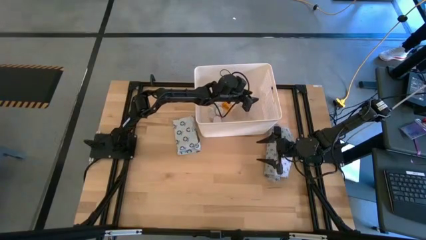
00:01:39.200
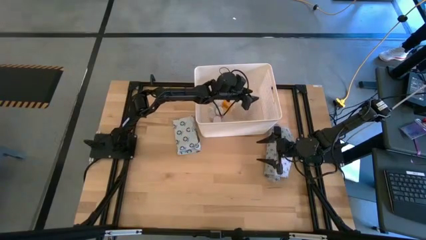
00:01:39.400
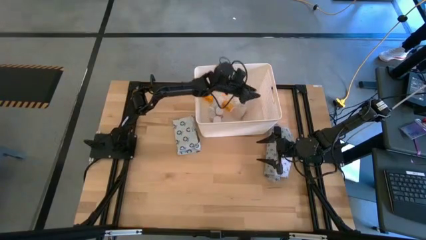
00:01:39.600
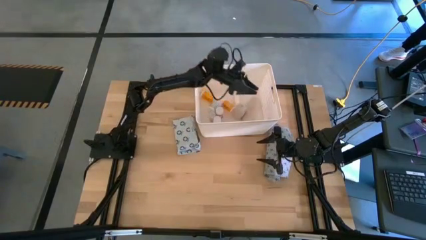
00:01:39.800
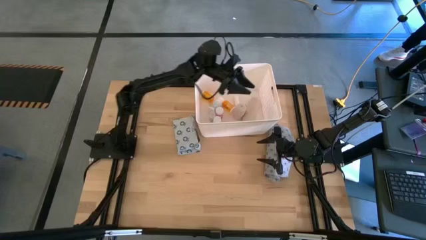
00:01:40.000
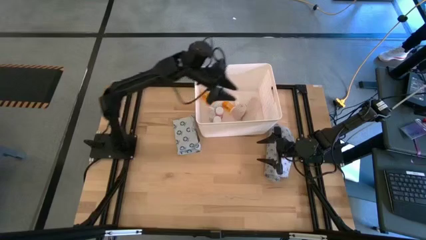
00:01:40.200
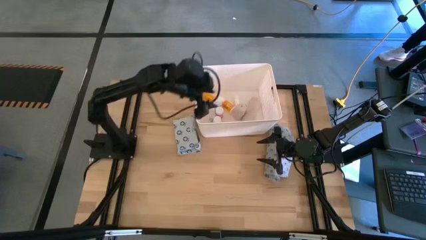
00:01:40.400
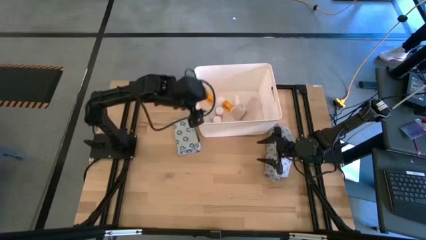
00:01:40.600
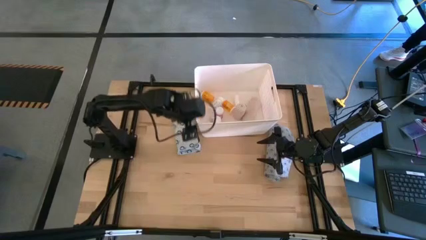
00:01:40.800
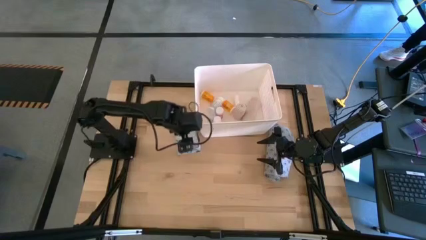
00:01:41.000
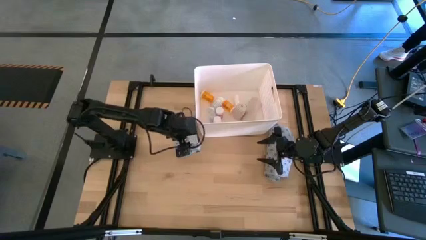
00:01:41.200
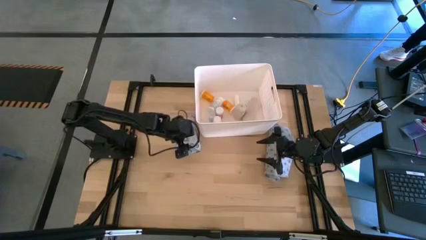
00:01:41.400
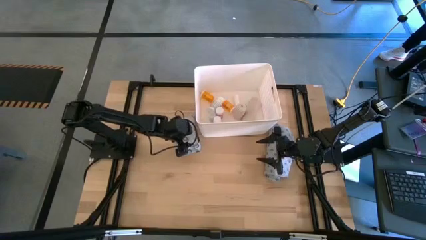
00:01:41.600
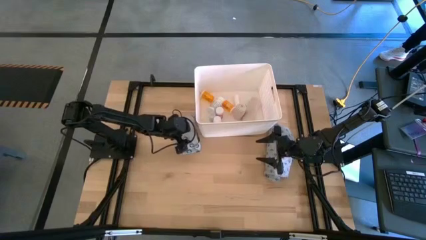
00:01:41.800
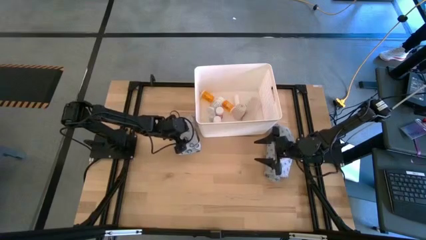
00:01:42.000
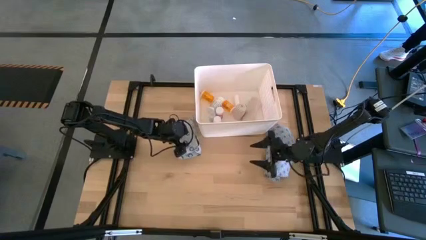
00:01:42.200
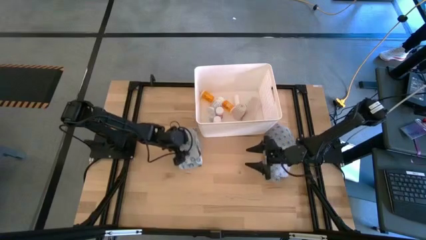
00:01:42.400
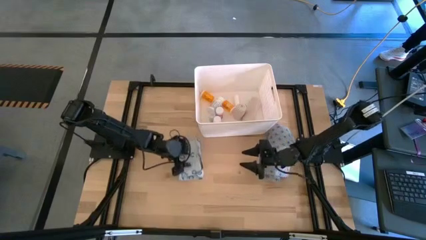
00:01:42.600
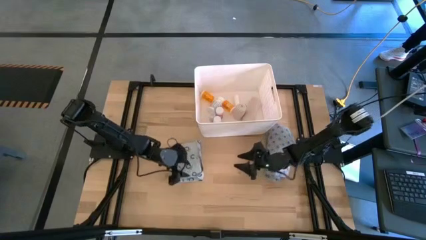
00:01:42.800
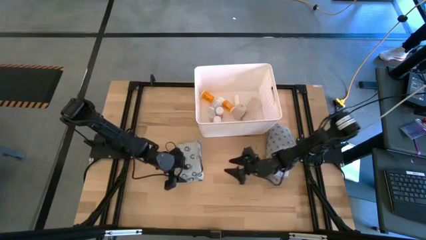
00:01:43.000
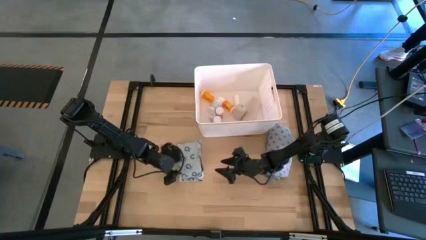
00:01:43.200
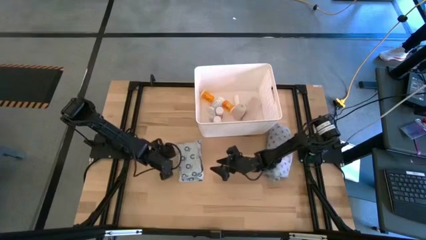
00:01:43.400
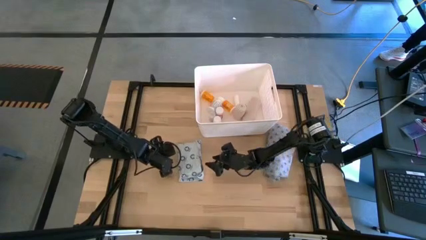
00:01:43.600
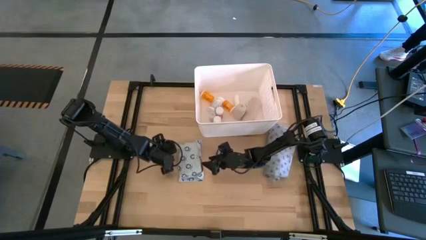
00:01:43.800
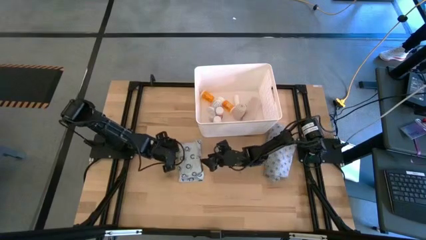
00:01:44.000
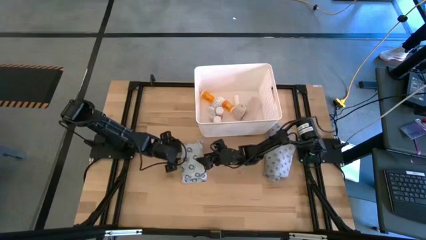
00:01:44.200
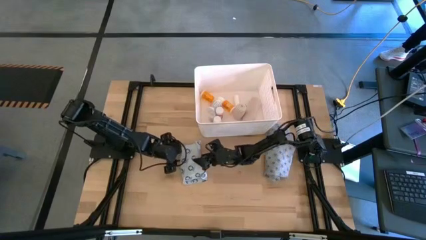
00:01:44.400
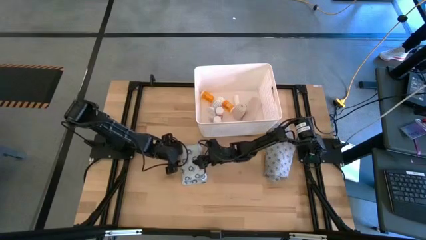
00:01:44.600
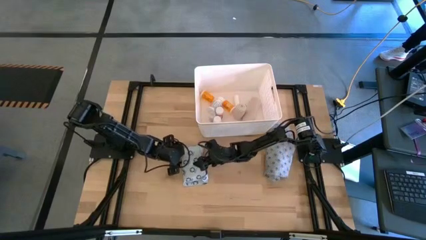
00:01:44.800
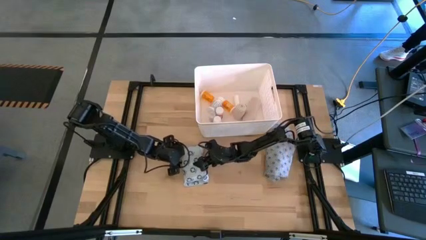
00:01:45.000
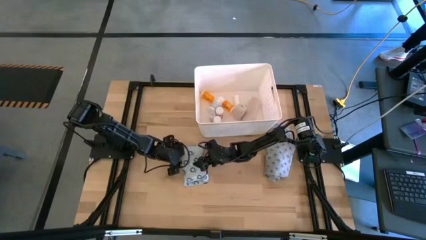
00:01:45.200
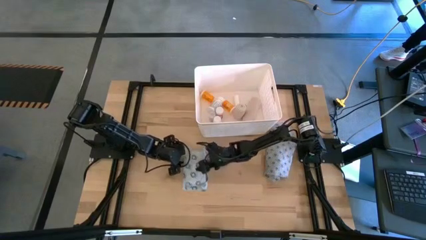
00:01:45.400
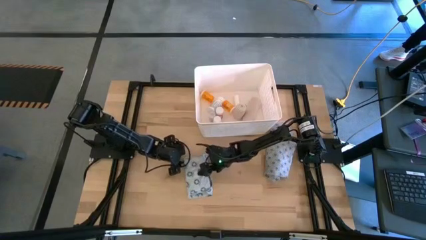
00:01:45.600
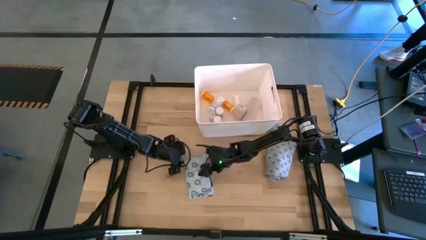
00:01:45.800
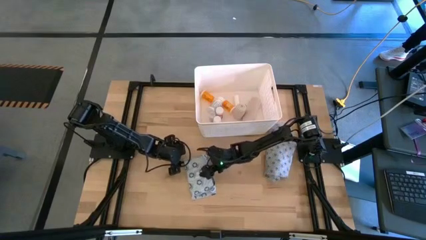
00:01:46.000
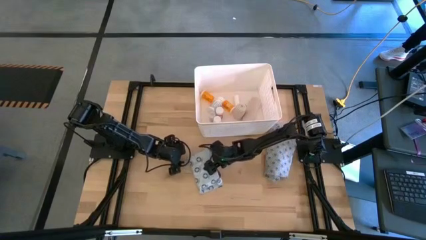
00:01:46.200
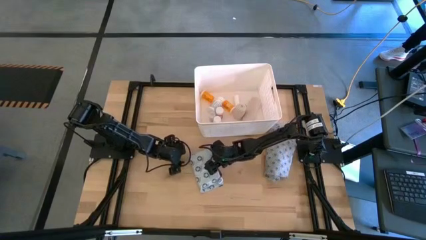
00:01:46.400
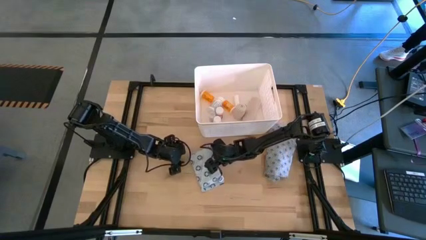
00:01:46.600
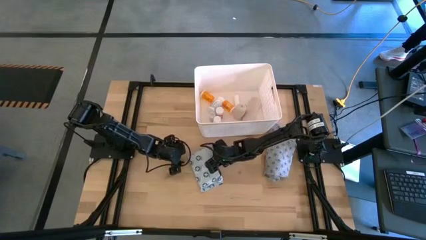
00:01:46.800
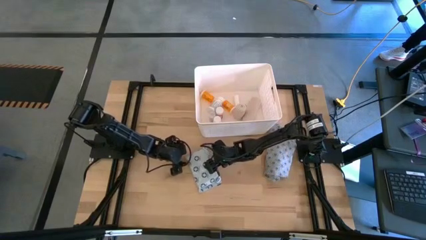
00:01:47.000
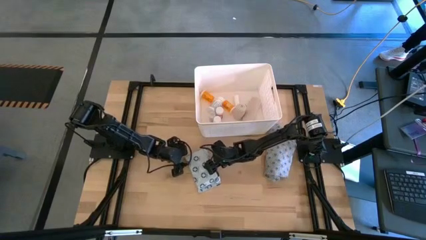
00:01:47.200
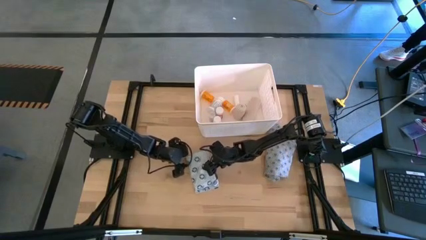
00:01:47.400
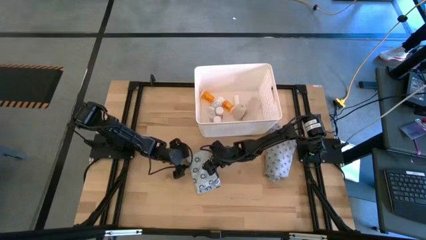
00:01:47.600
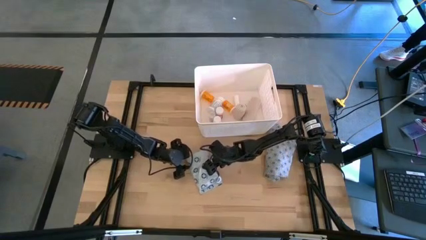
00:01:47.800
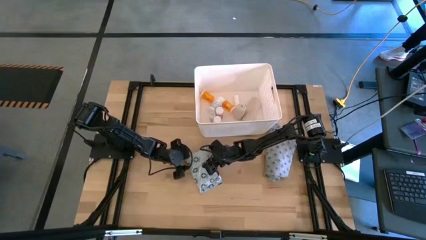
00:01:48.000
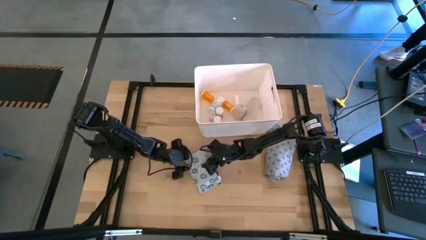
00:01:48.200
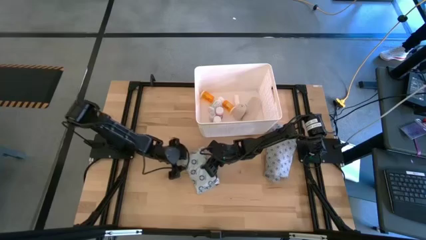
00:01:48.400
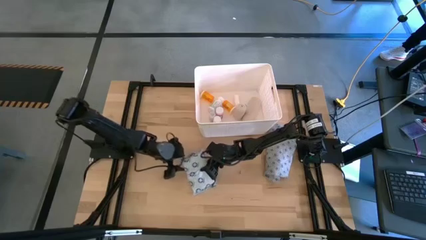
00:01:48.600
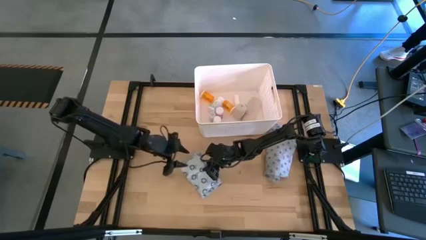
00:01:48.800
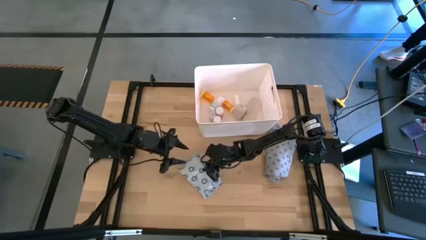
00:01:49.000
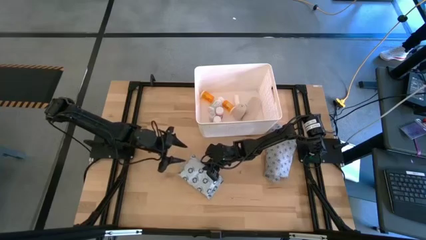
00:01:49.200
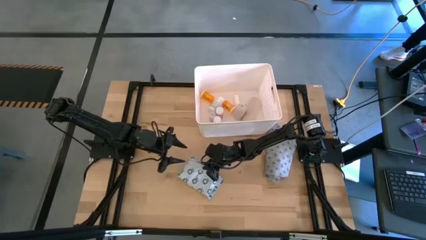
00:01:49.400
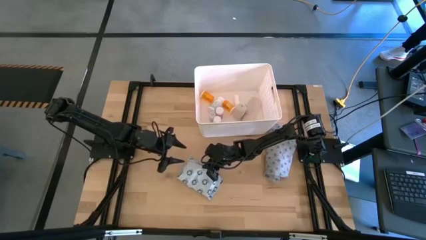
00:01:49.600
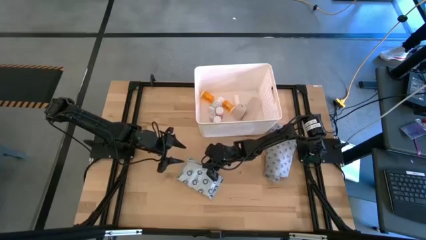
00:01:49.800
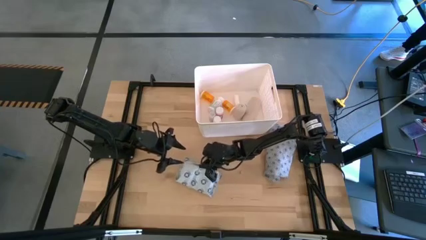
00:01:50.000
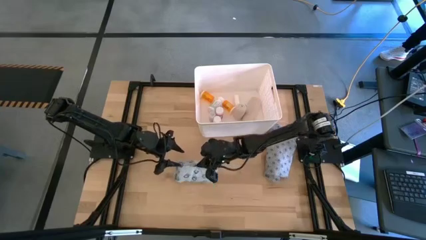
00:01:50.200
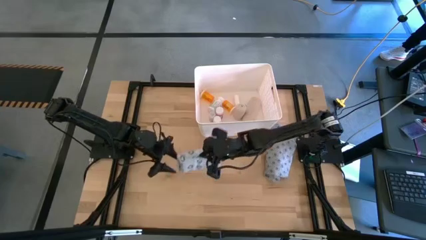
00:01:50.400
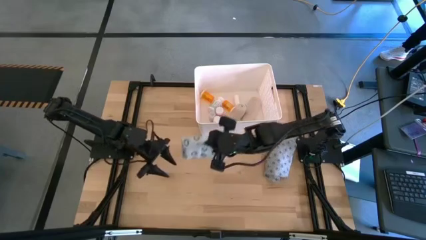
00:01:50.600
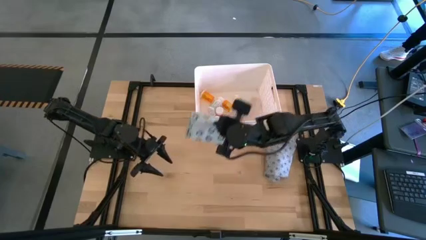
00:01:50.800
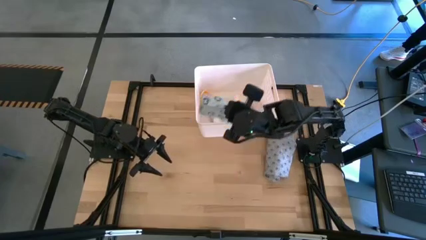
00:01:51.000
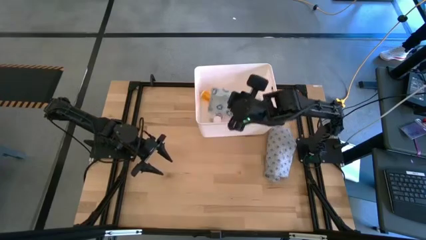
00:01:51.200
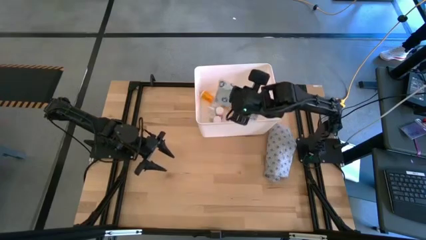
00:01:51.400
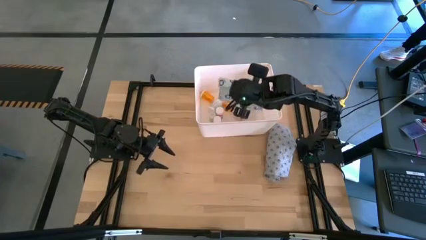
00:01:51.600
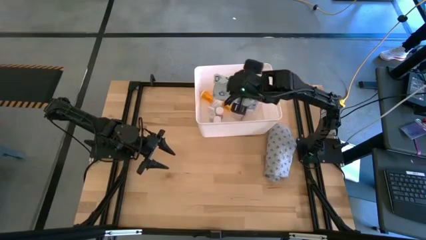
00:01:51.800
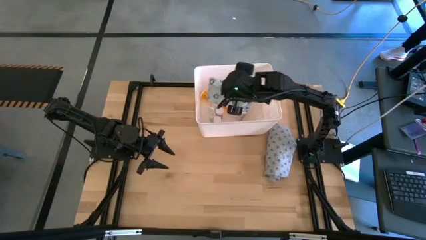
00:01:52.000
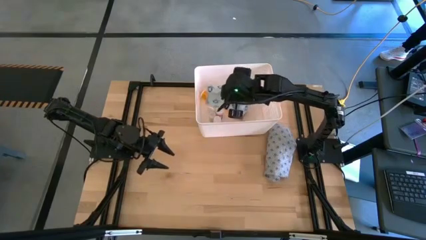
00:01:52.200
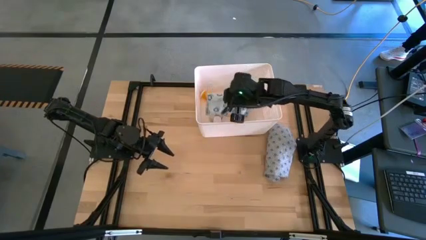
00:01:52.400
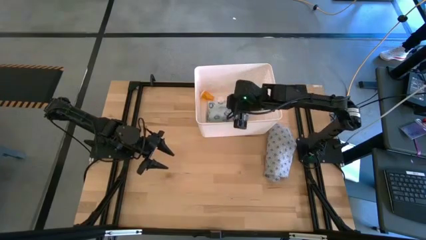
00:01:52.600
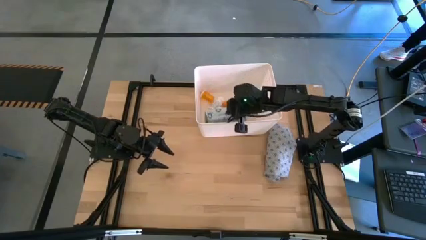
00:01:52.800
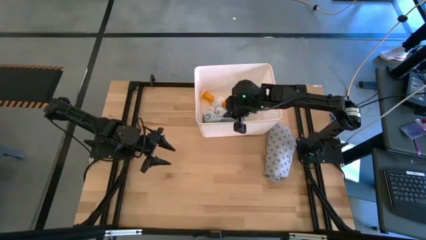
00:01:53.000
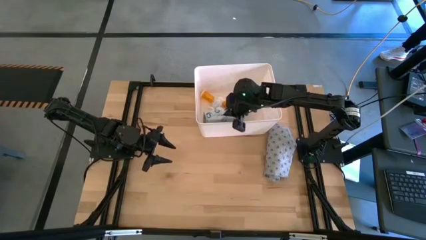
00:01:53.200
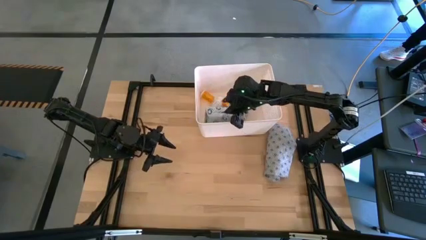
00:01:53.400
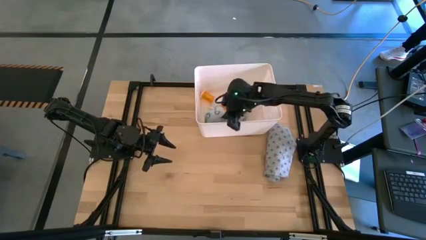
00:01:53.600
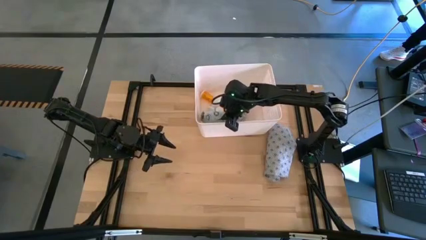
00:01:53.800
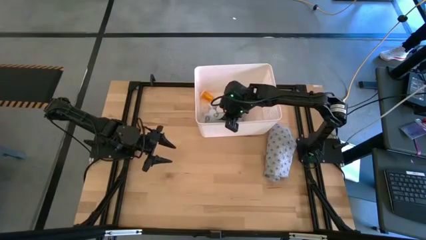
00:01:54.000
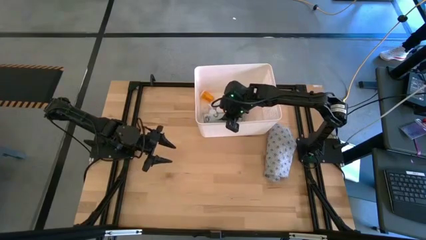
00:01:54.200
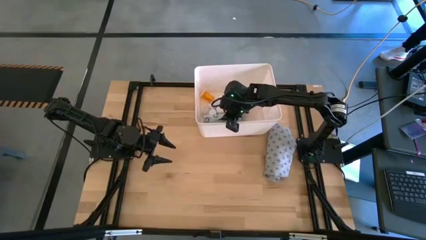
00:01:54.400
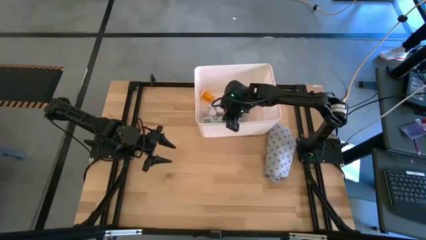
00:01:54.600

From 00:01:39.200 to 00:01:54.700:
Task: Pick & place medical supplies in basket/bin
Put the white mailer bag into the white bin

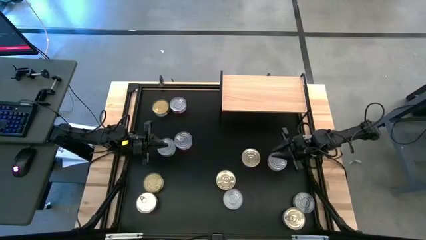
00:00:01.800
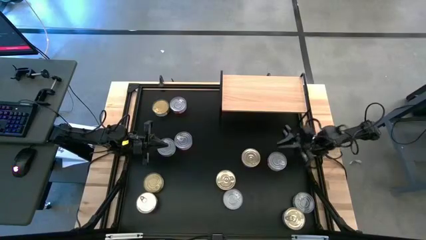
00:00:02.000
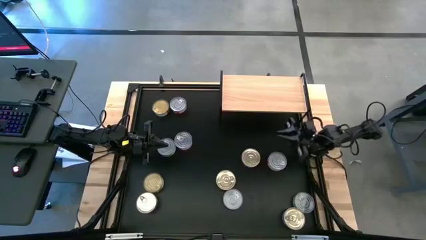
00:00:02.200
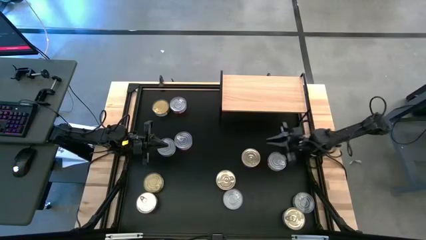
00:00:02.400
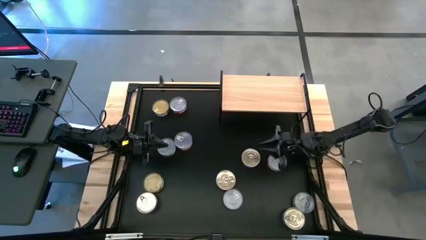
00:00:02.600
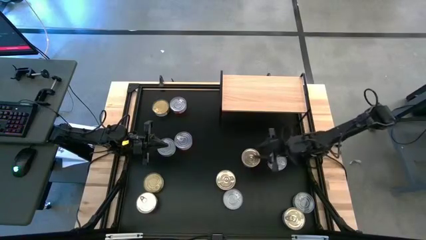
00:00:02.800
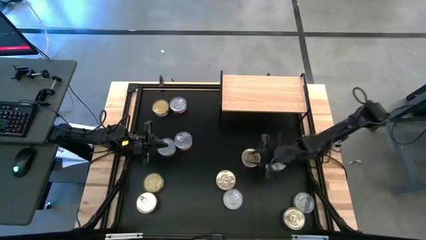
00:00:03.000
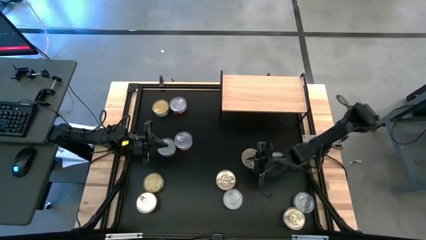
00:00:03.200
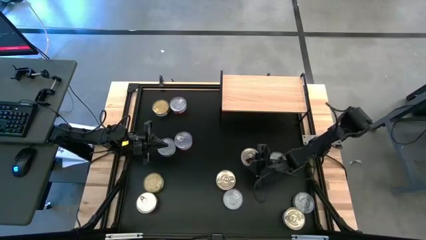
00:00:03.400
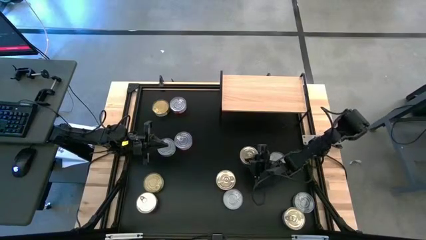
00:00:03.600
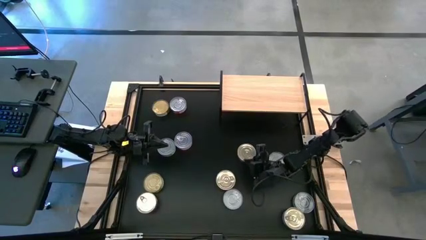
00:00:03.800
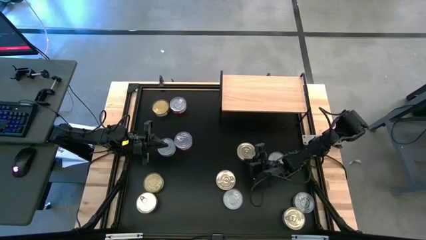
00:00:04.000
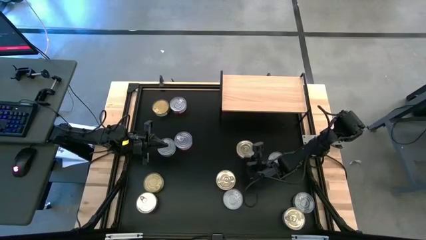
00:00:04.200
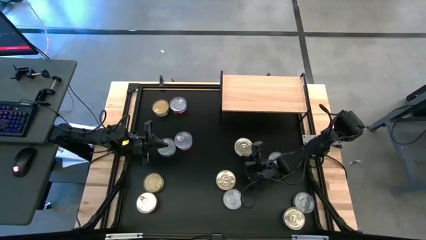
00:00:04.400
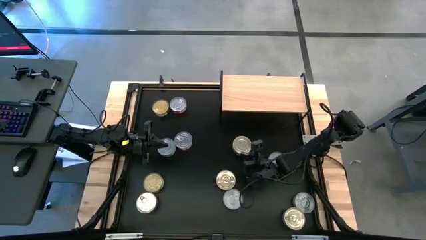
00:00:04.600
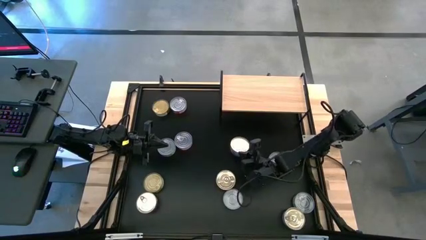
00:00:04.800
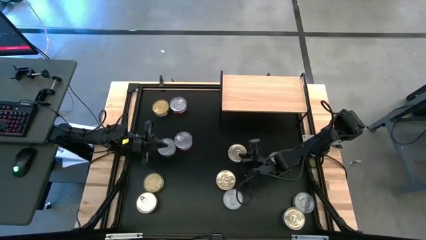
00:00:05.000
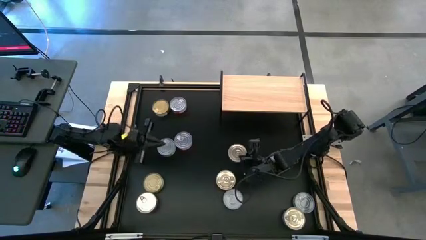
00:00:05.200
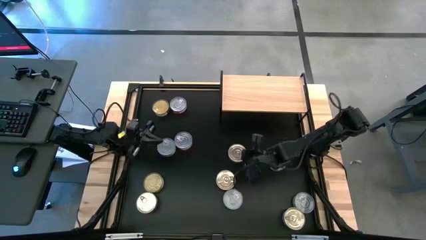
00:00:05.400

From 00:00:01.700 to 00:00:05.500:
Task: Stack canned seafood by type on shelf
Put the blue tuna can on the shelf
